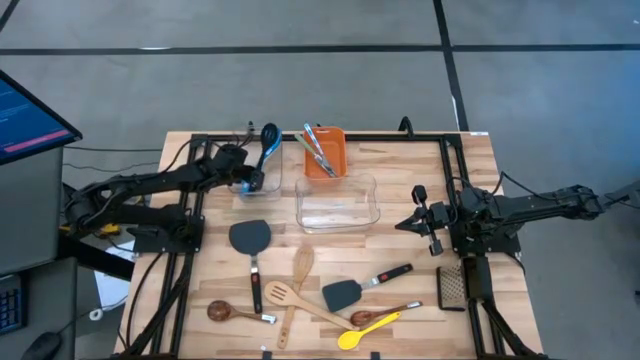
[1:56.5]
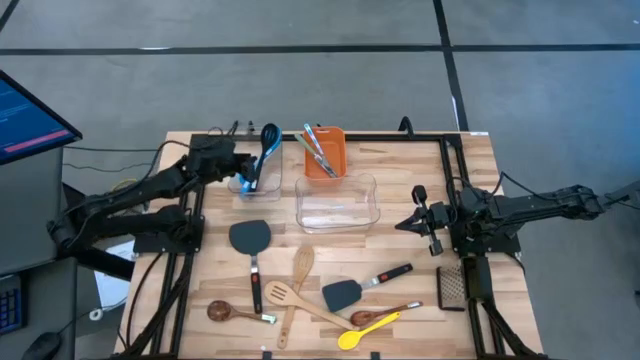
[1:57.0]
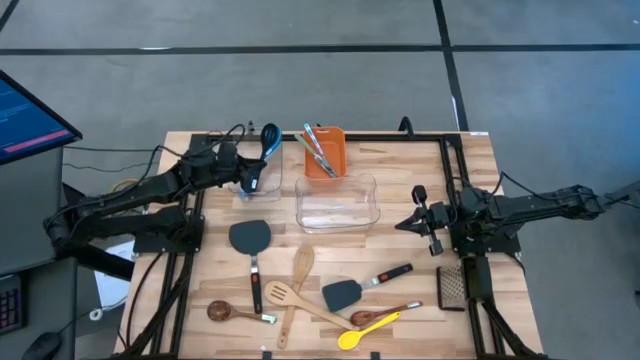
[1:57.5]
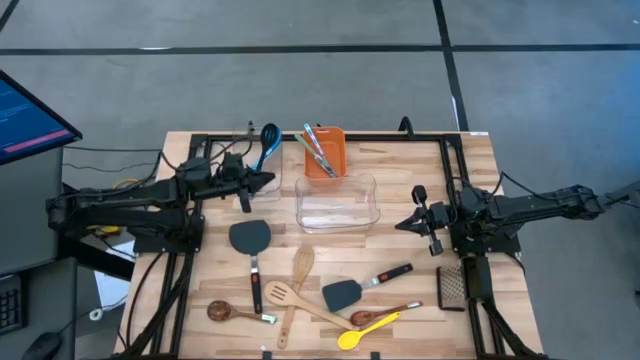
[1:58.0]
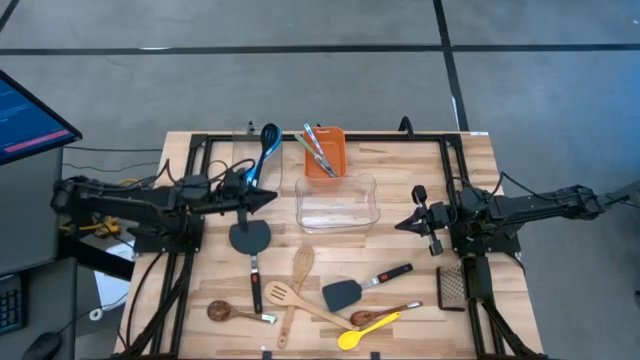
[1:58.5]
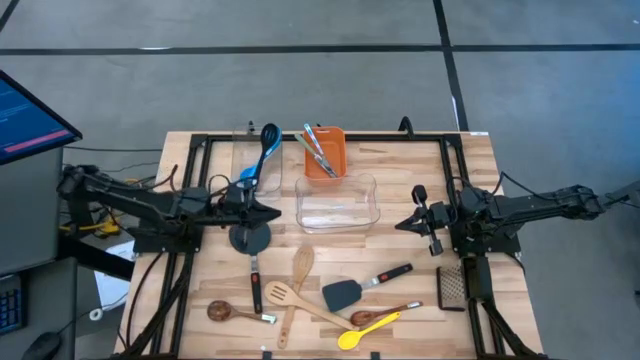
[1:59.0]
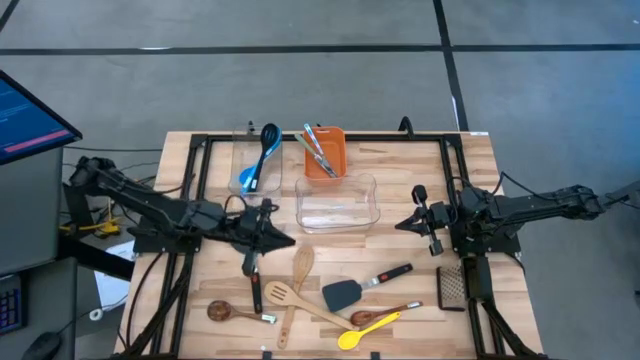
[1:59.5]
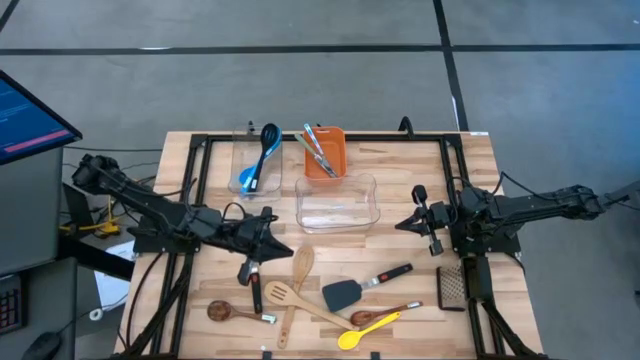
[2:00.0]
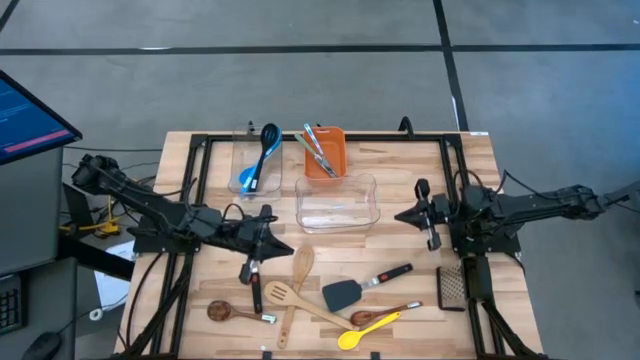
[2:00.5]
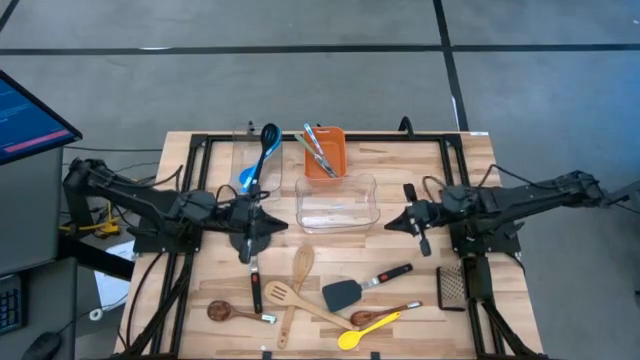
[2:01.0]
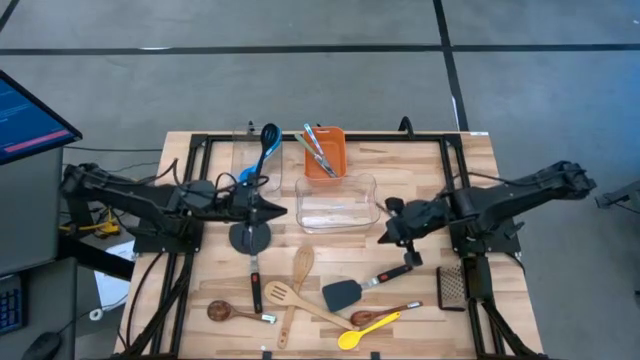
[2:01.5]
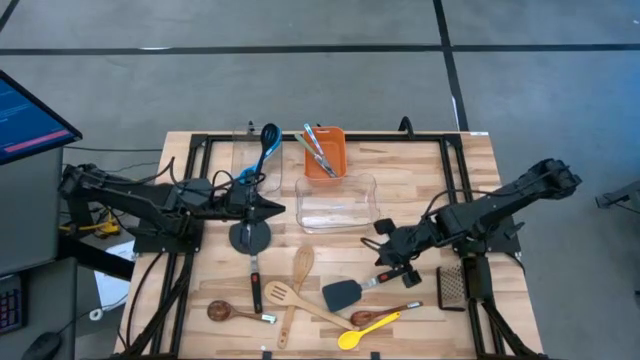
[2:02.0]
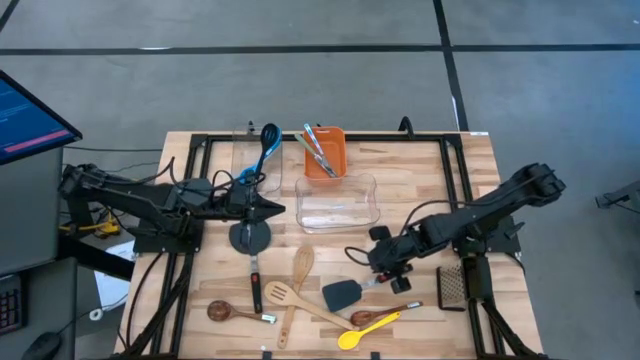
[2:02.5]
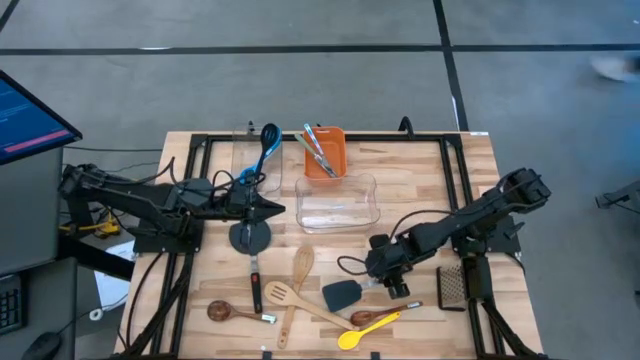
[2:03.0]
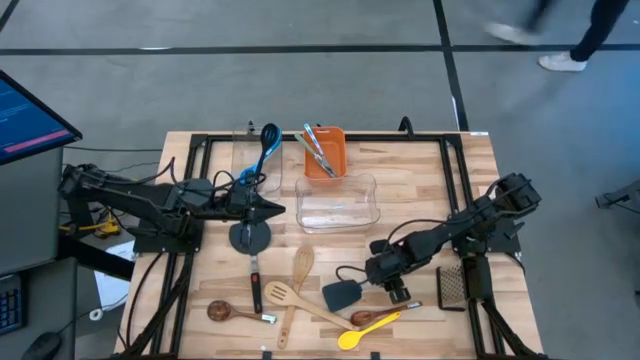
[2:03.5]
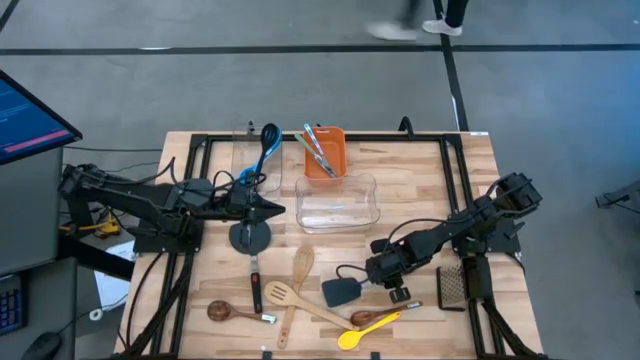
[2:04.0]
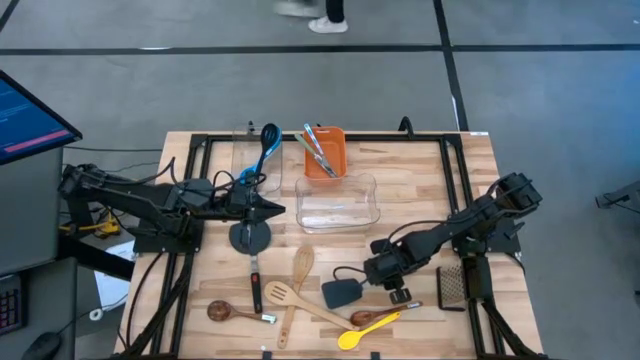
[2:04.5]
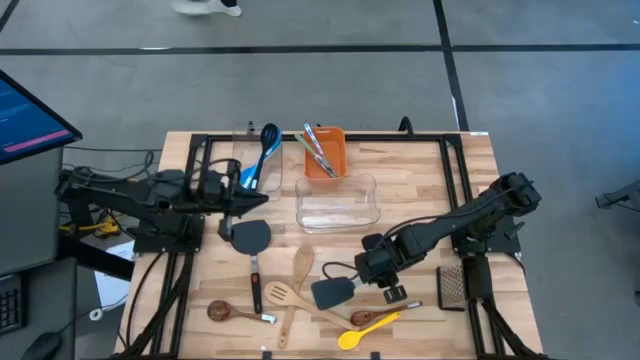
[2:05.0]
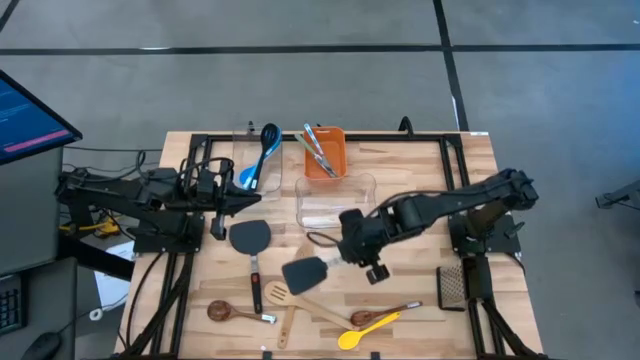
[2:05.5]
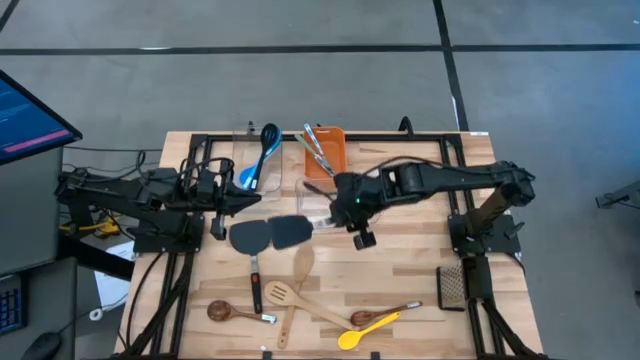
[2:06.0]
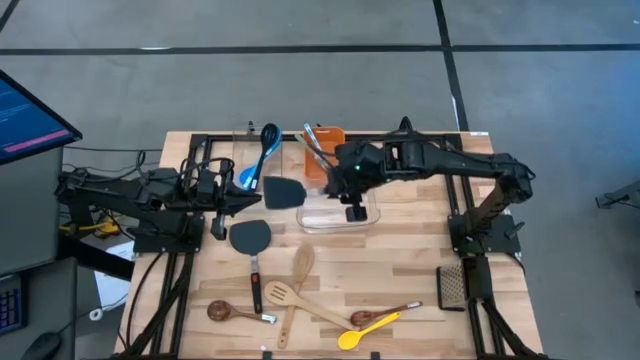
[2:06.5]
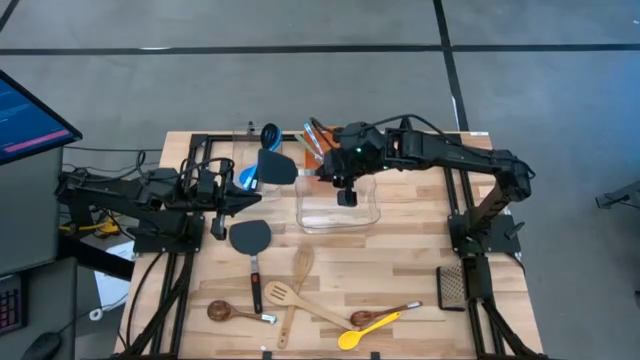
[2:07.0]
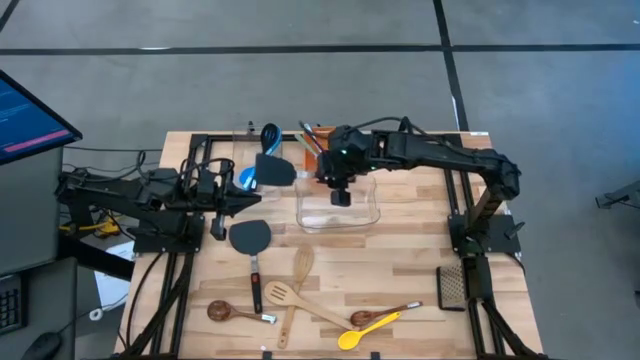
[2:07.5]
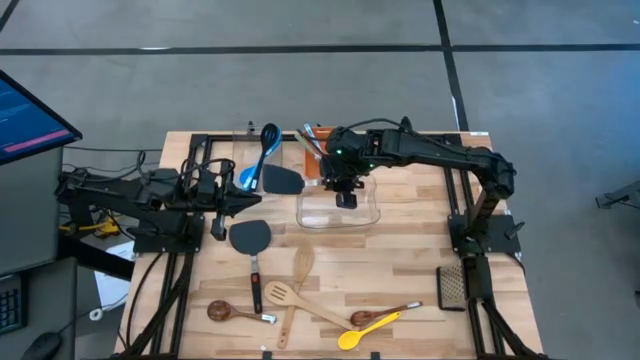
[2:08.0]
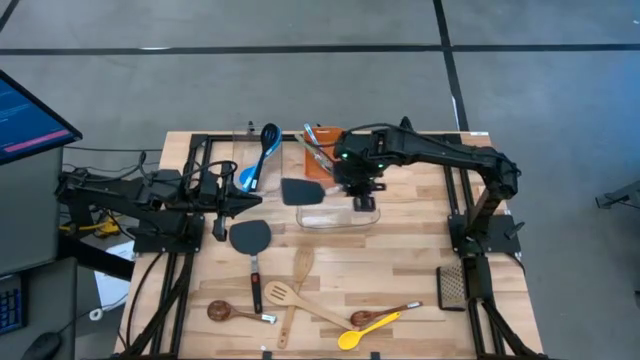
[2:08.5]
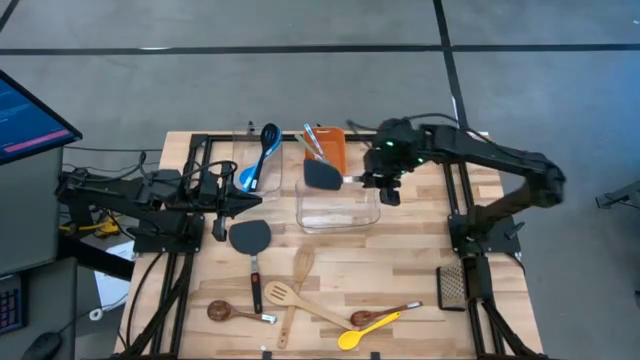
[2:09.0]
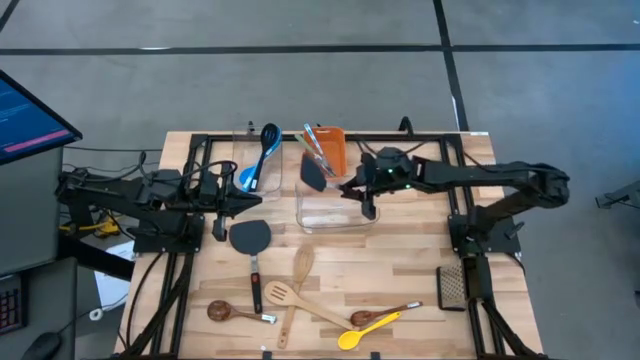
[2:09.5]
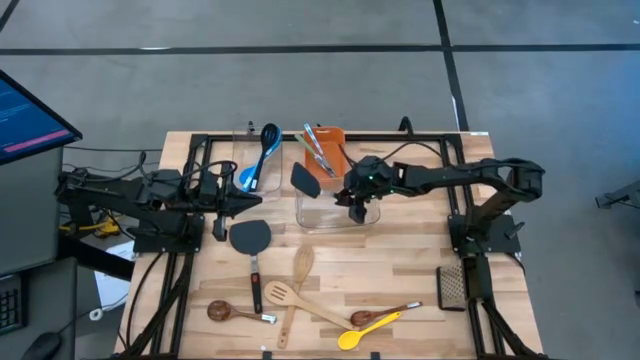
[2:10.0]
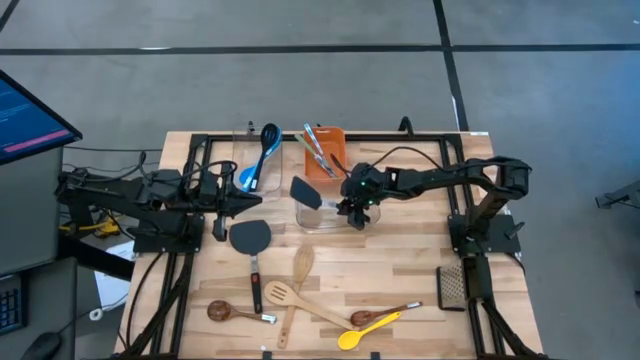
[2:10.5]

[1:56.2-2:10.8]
Task: Pick & Place Kitchen Items
Put the black turner spatula into the bottom transparent bin

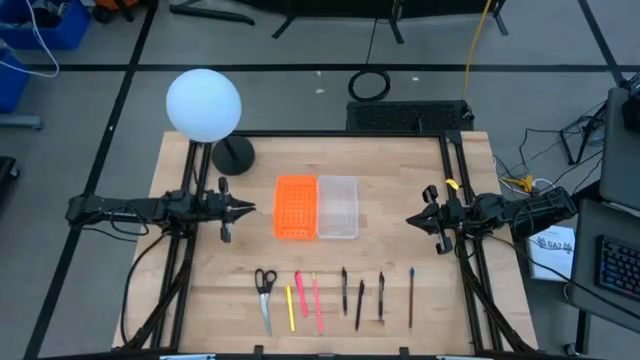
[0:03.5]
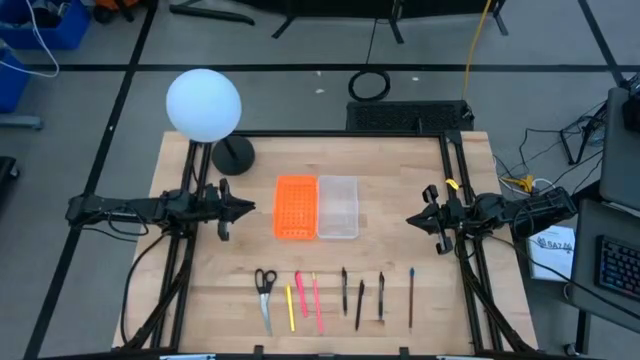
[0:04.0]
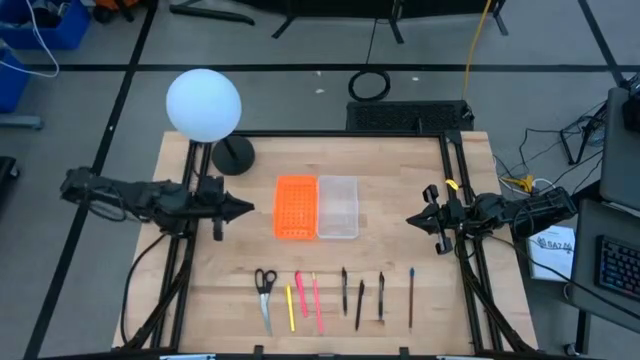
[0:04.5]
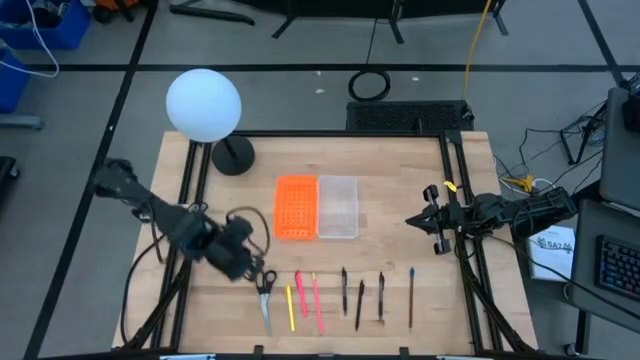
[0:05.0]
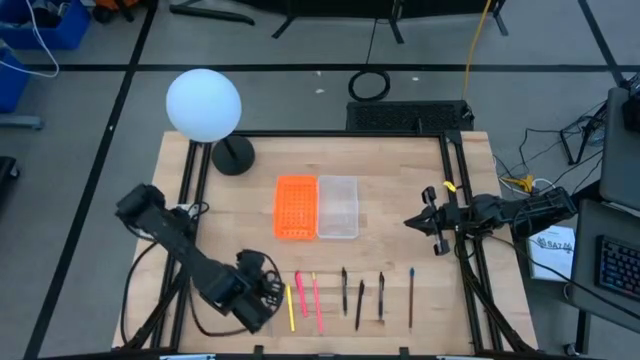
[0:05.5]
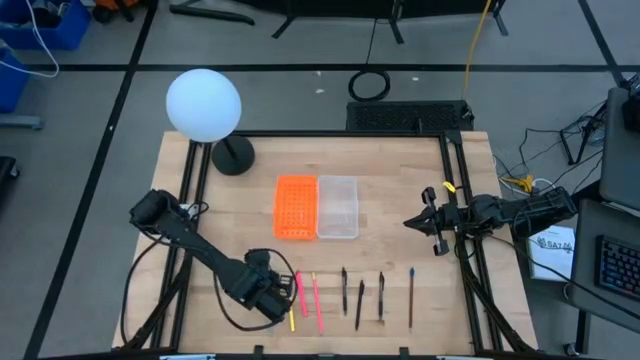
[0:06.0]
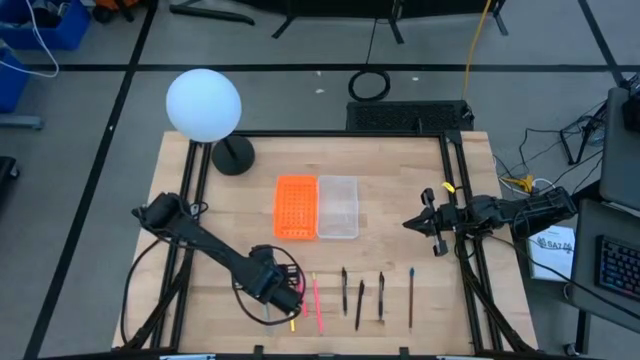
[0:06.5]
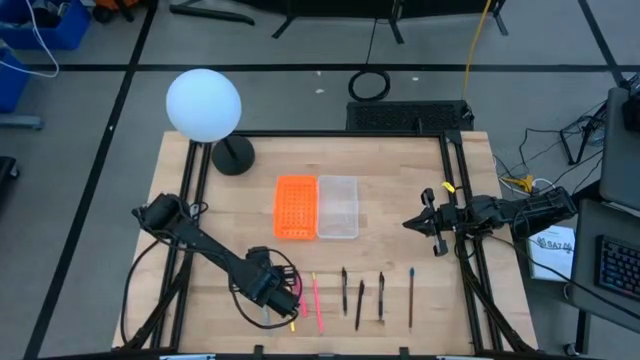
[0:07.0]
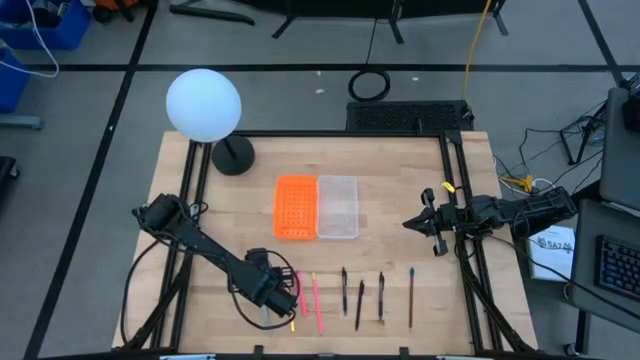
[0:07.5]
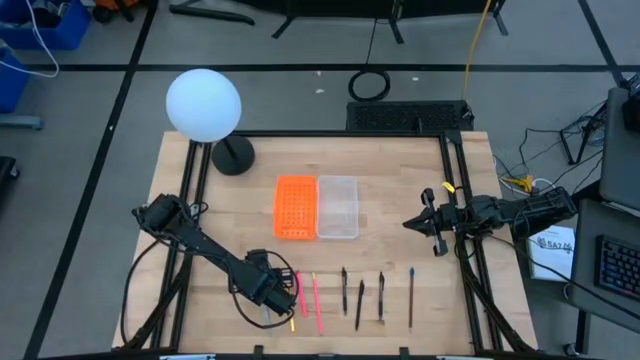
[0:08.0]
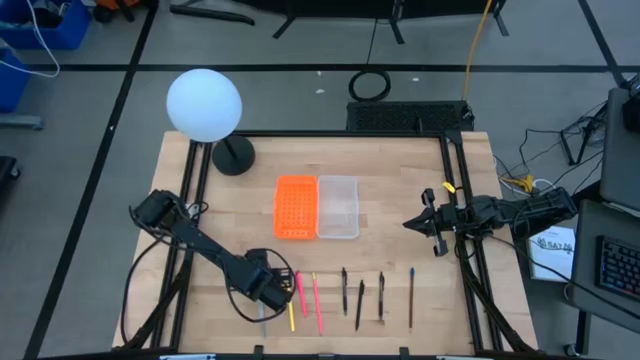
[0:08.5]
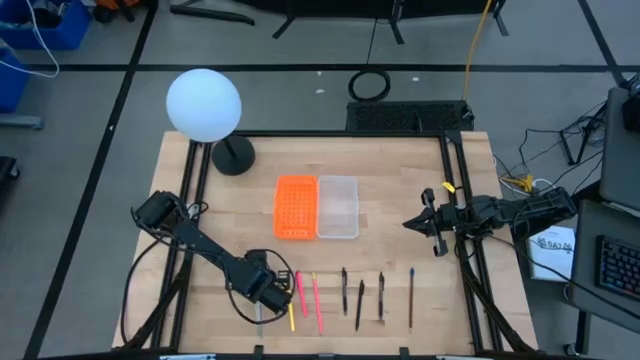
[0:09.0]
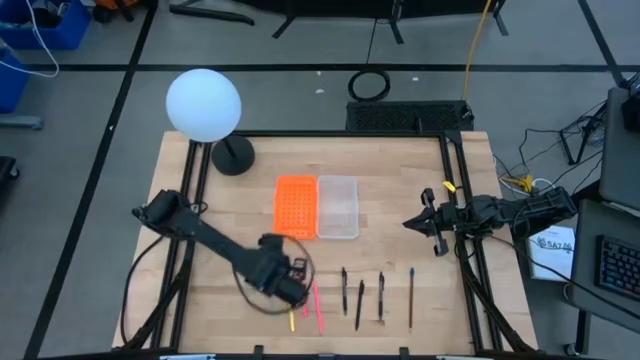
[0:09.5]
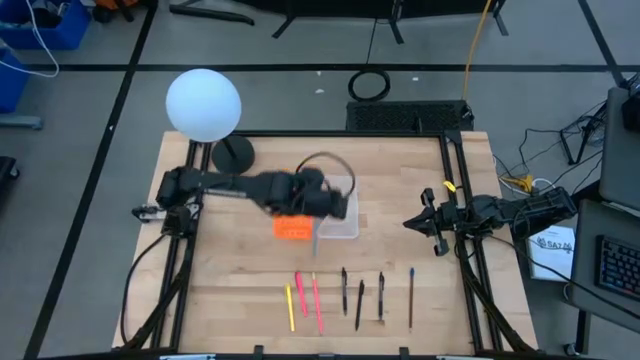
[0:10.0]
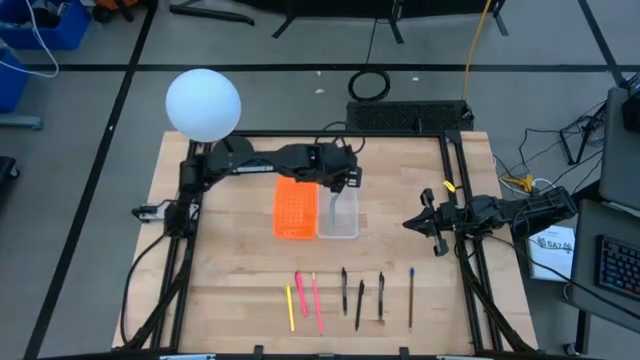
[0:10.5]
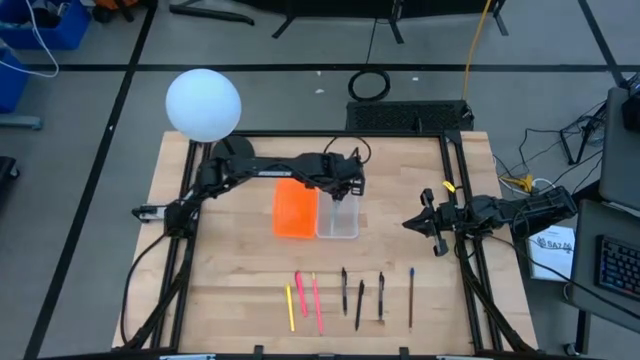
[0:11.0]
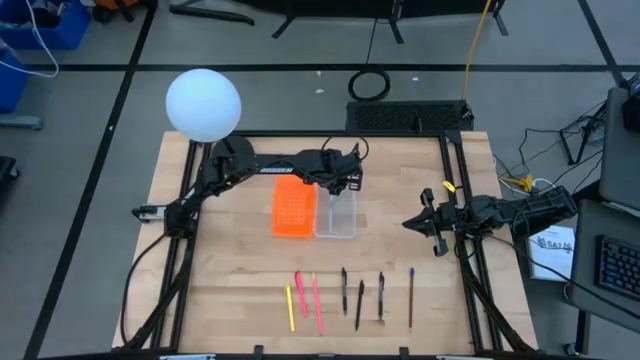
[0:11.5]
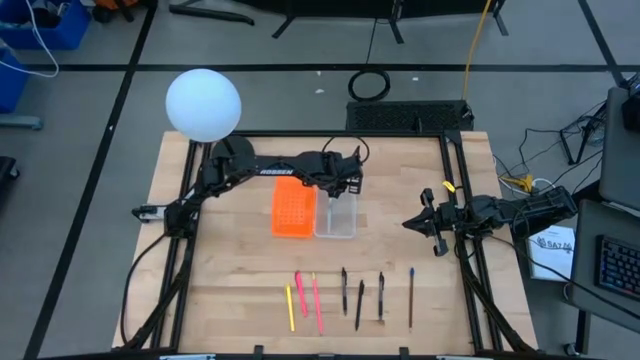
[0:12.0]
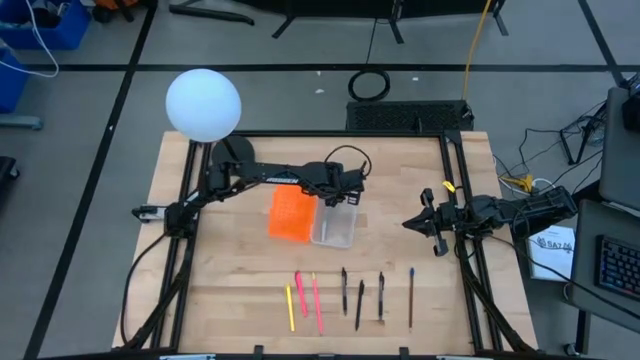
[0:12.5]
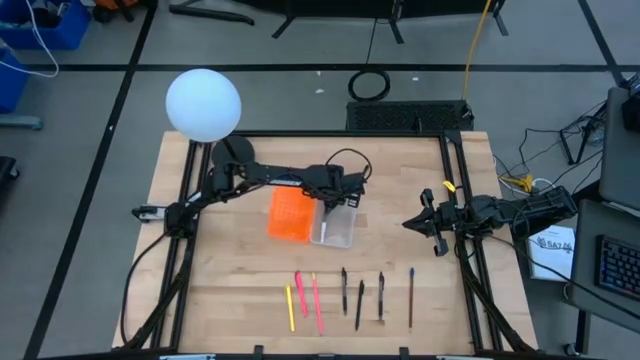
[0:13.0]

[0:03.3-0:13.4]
Task: Pick & place school supplies into a supply box
Put the black scissors into the orange supply box
